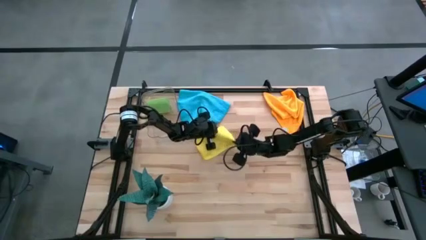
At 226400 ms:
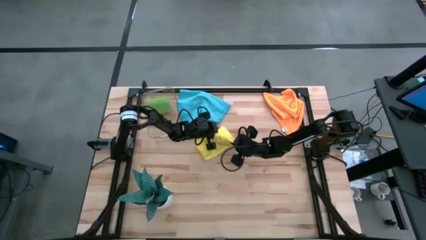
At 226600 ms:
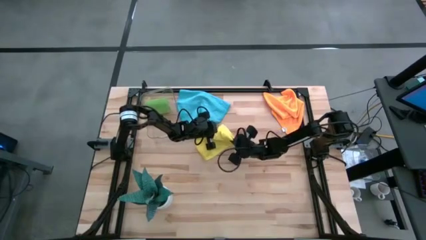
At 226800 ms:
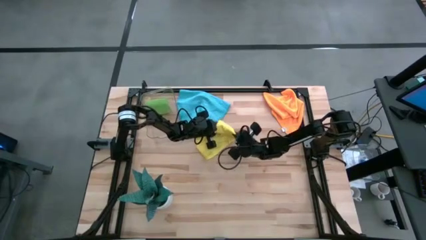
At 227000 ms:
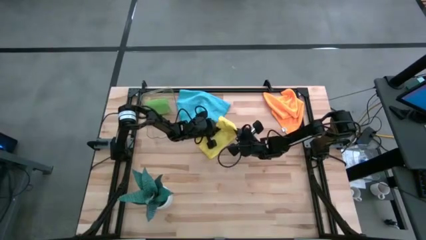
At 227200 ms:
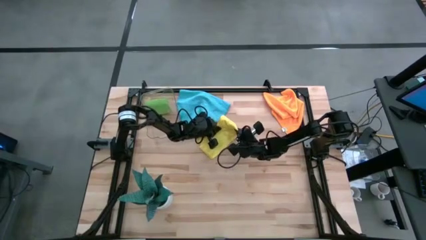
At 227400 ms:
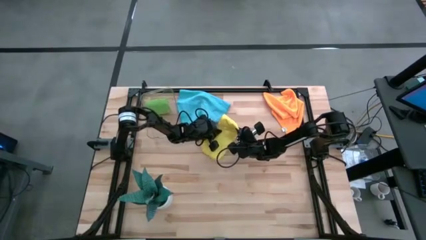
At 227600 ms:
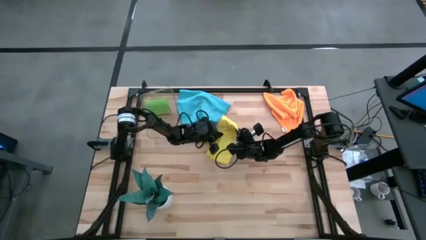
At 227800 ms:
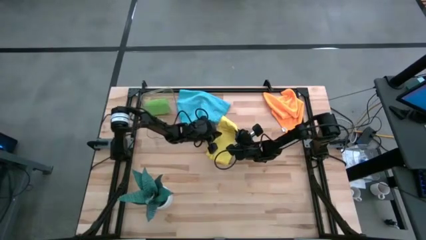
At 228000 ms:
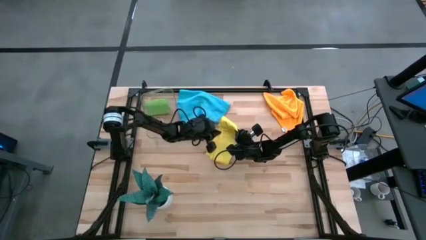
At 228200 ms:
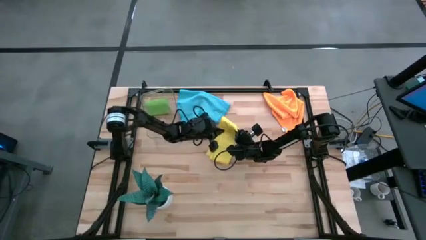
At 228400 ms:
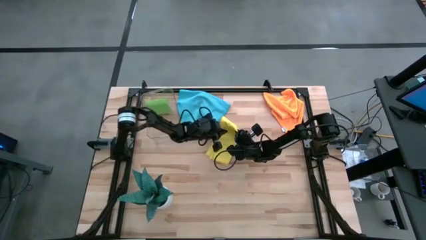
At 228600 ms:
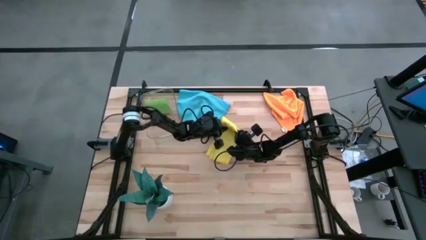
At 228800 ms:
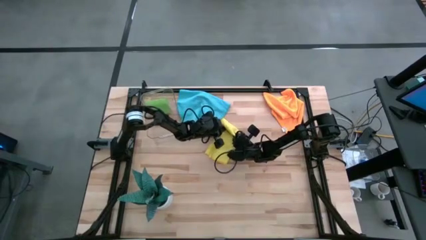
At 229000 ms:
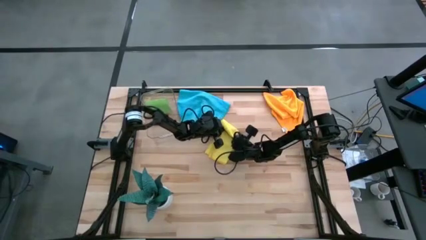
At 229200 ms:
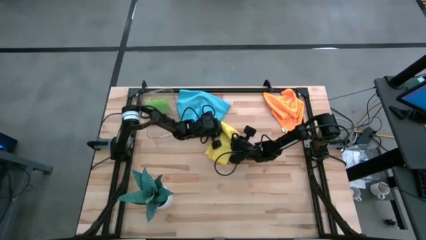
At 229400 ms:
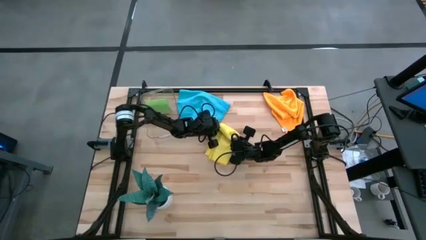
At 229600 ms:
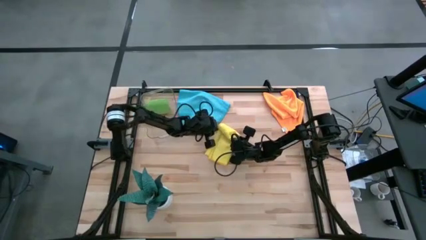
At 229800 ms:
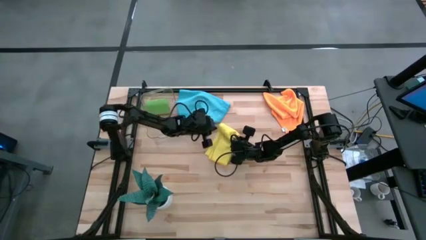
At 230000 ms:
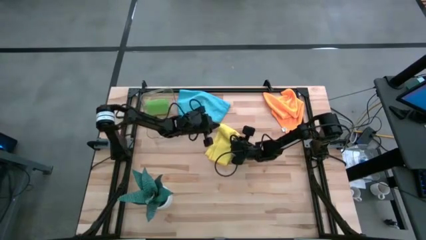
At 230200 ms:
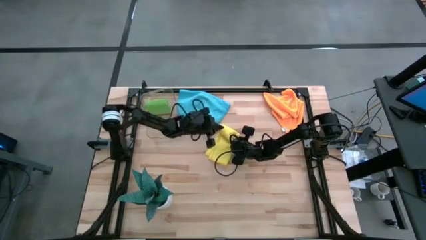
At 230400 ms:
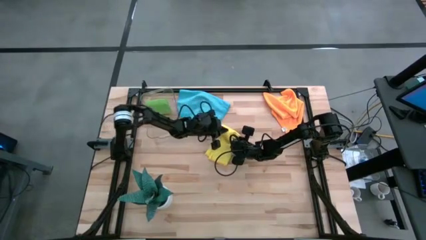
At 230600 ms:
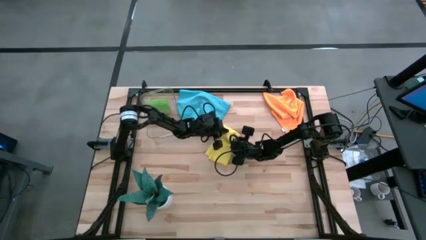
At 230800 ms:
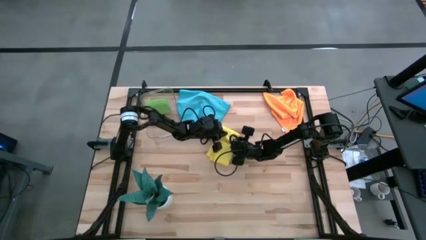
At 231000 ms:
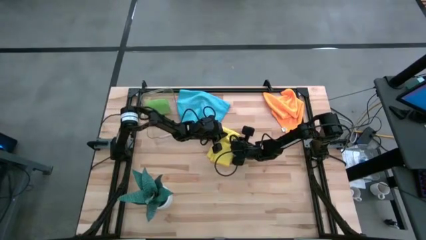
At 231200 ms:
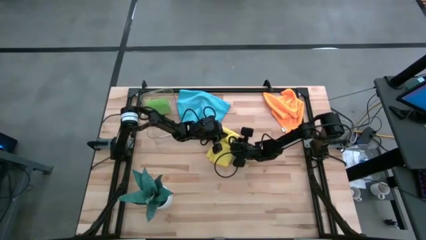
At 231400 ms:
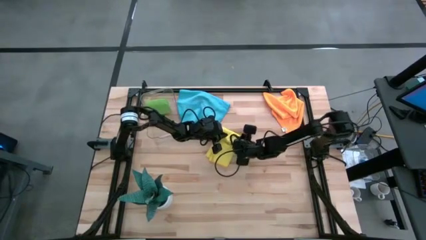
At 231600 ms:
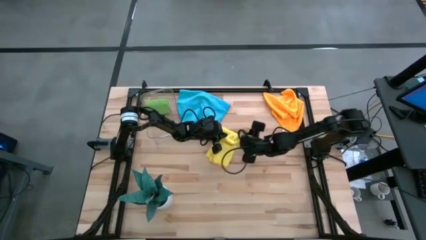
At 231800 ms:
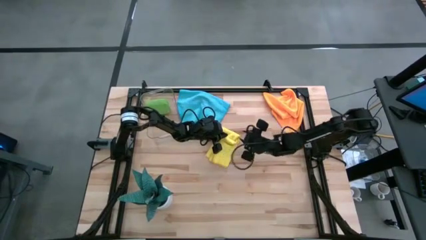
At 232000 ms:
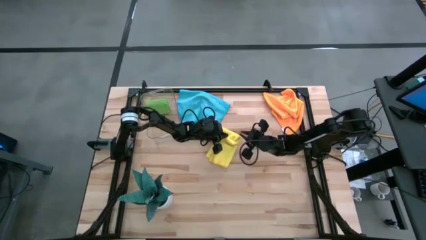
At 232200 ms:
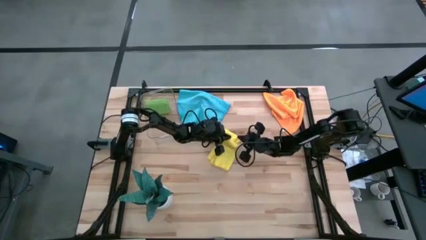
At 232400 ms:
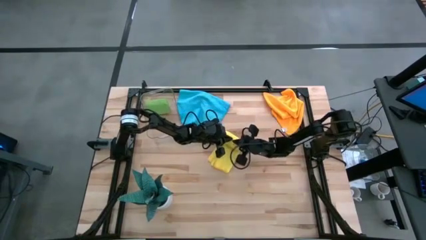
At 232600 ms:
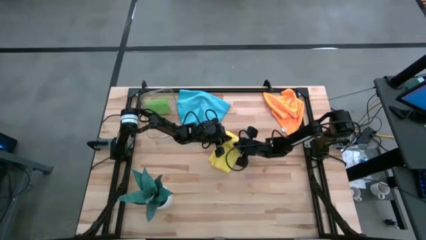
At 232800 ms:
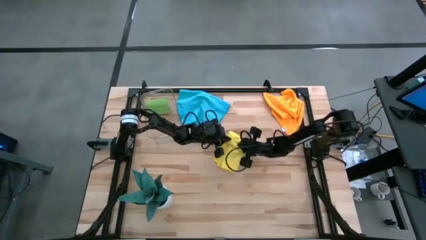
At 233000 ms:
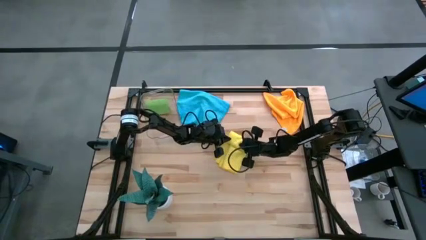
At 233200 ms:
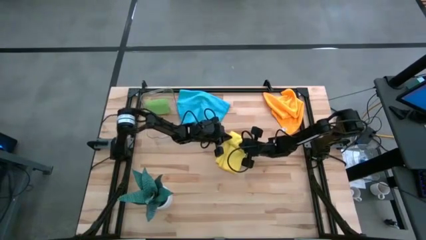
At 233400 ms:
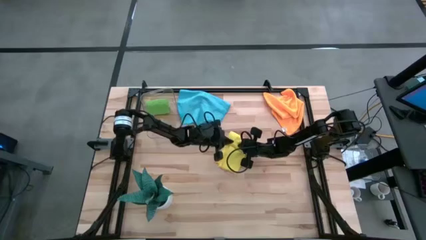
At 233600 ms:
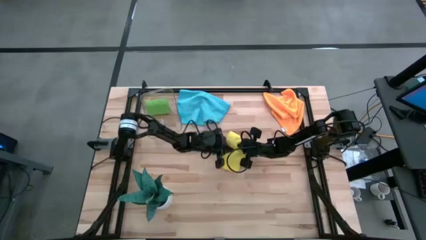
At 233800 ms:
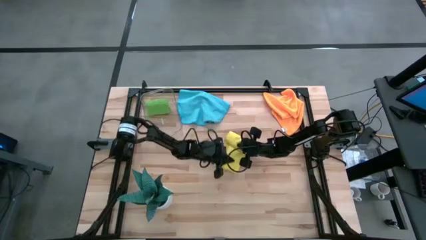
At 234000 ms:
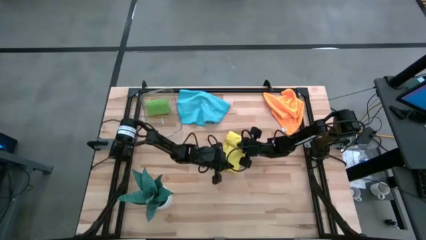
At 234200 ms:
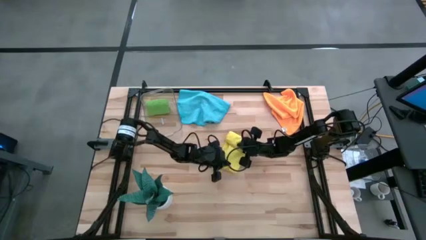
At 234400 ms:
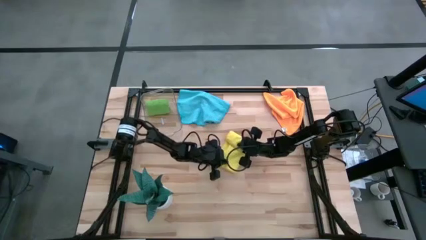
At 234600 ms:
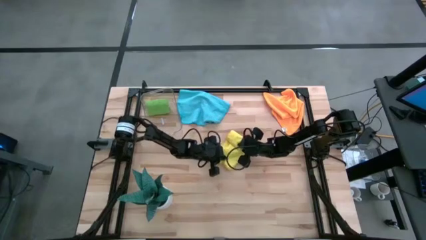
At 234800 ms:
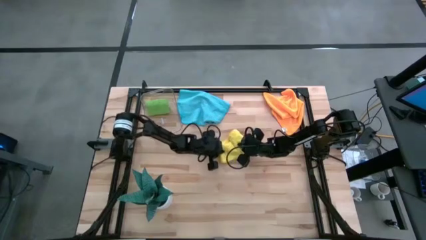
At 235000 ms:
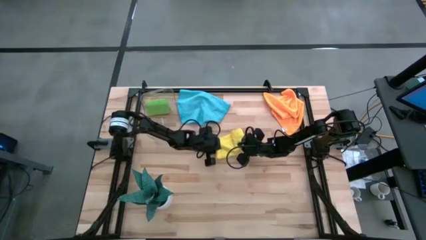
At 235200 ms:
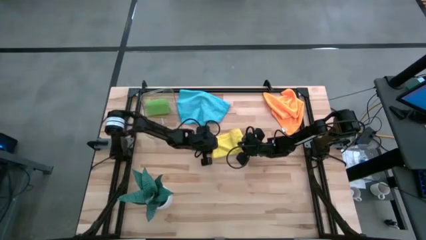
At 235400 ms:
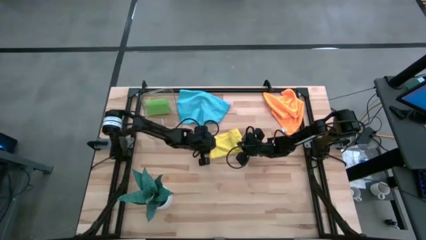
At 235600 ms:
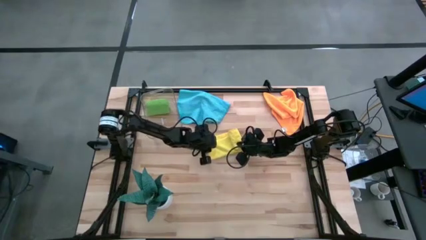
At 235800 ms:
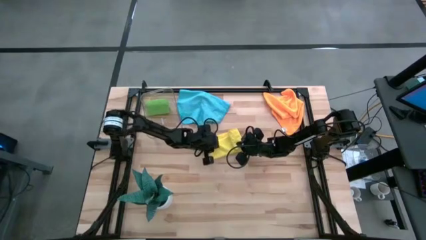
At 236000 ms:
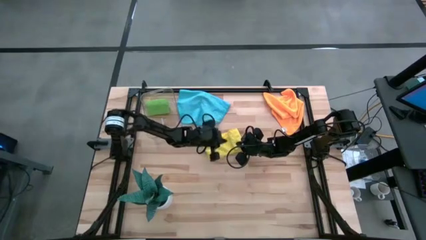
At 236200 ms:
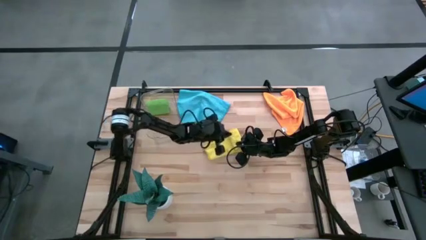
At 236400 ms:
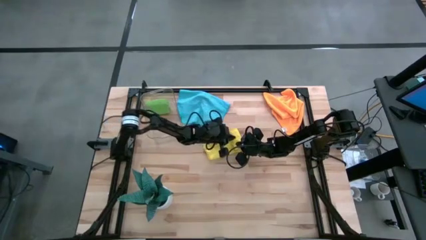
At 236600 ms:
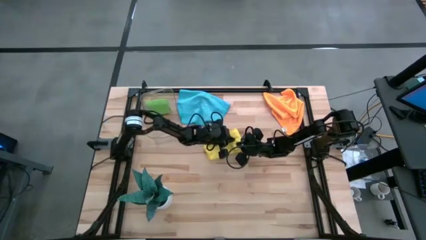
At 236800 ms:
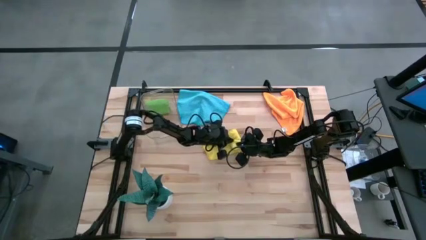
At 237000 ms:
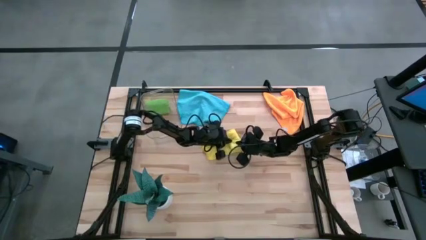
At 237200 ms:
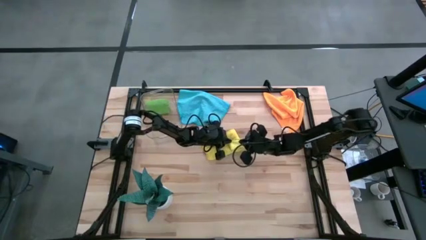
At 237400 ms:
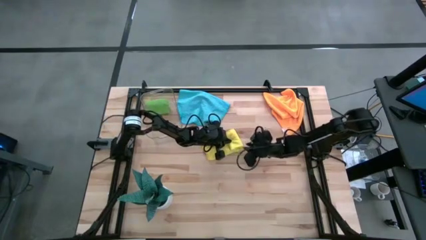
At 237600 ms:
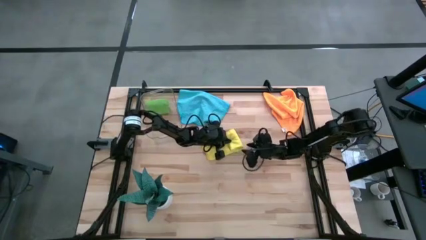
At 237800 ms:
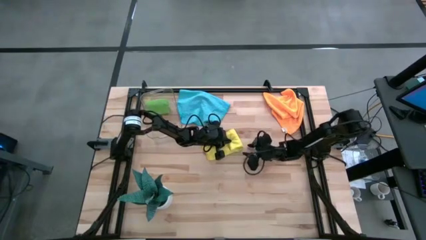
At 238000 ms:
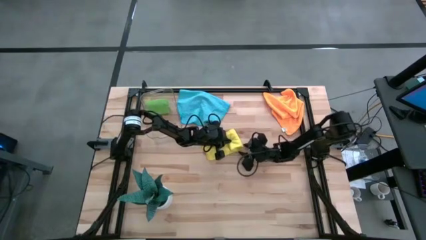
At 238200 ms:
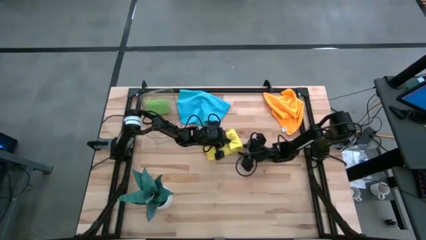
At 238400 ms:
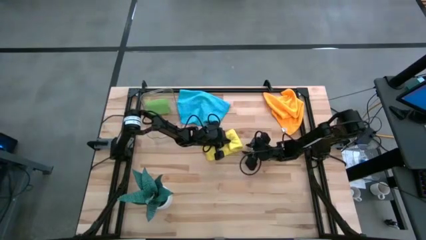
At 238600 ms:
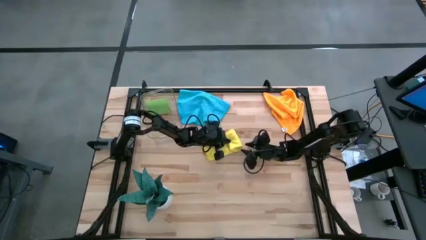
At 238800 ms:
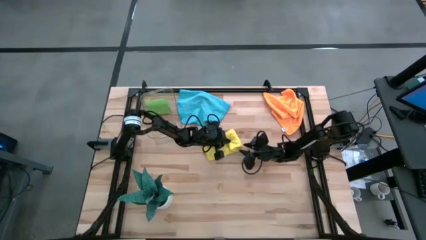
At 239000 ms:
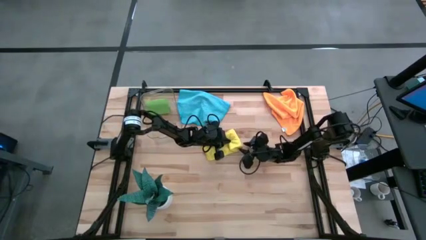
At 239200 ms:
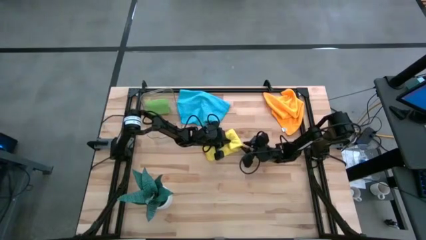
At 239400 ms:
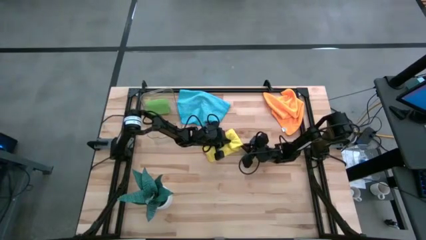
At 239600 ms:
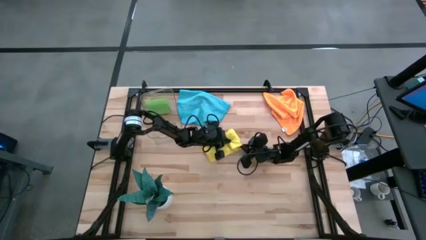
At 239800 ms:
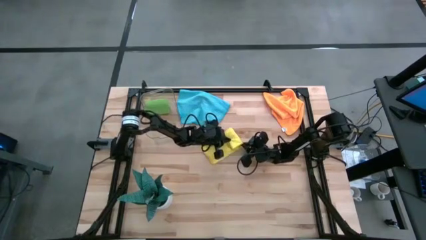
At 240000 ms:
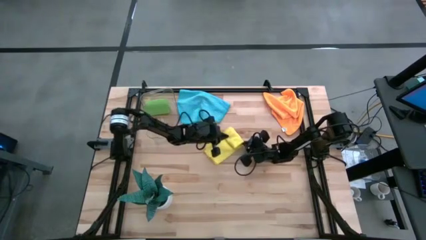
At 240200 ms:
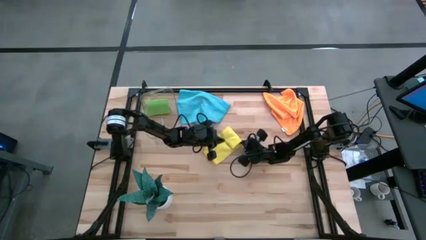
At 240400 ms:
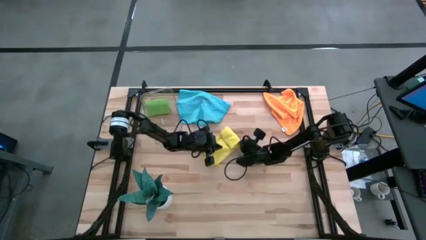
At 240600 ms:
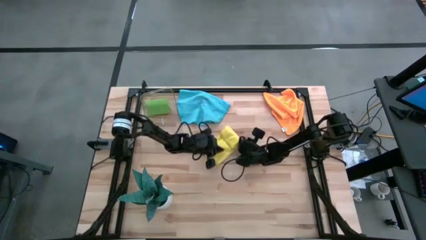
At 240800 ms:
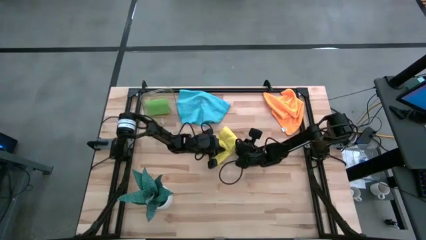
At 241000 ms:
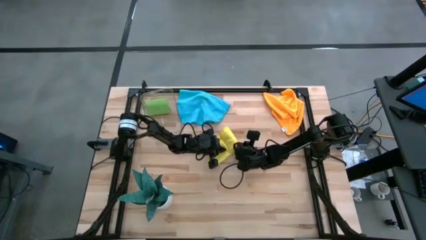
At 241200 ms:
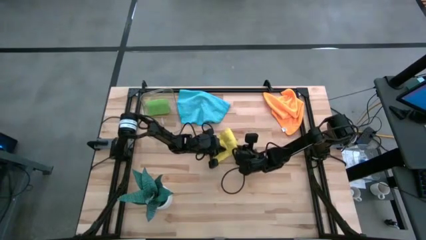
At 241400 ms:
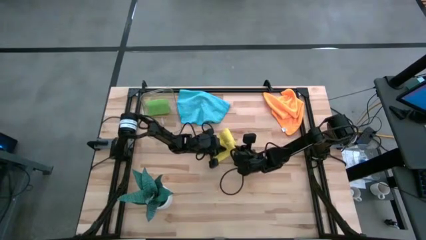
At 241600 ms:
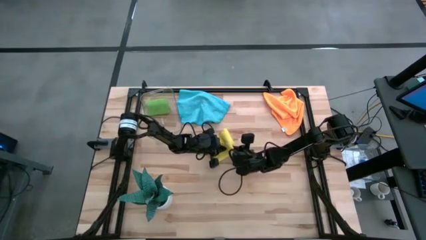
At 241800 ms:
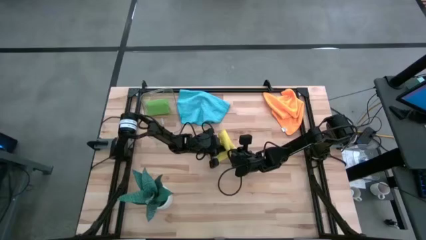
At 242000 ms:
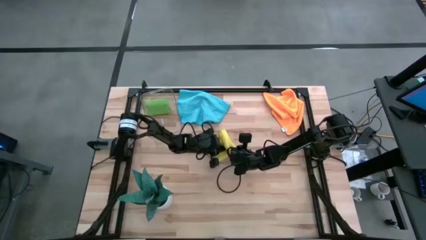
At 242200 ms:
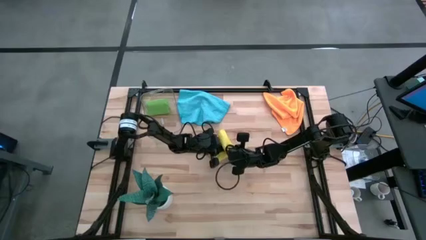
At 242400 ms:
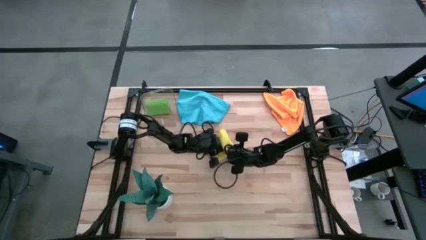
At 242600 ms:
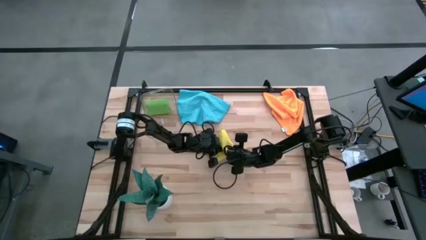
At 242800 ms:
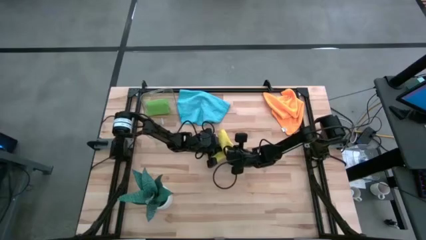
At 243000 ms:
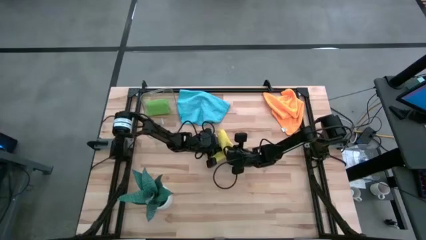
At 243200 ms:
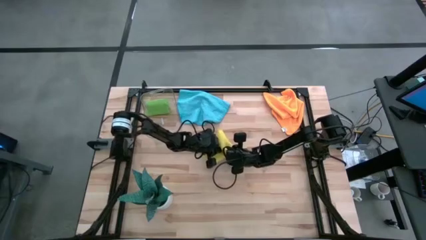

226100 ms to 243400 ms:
Task: Roll microfiber towels into tight, uniform cylinder then place into a basket
Roll the yellow microfiber towel
